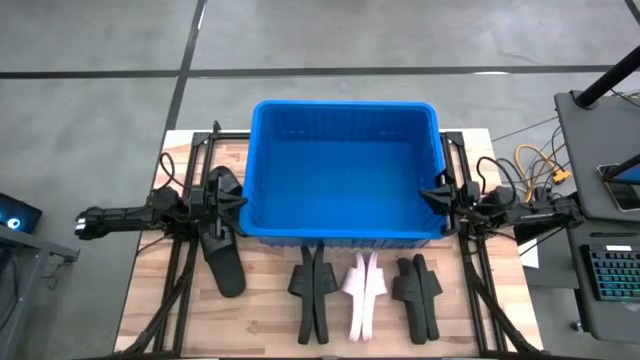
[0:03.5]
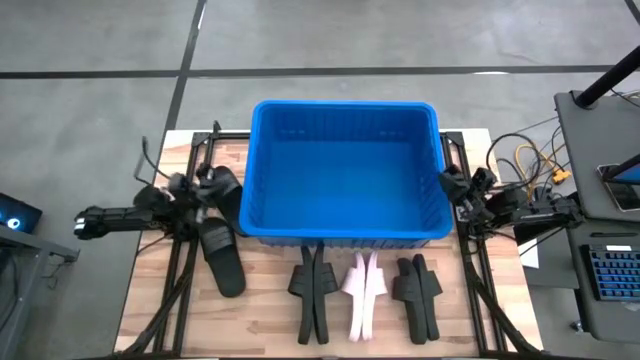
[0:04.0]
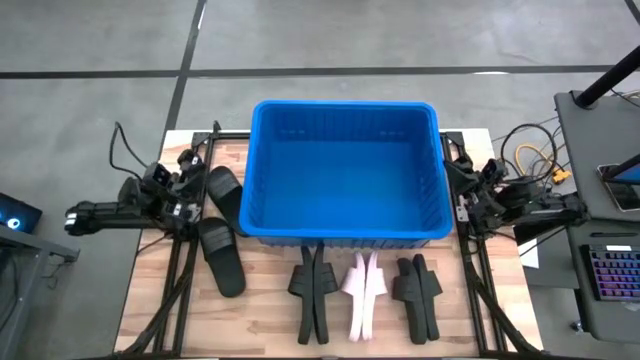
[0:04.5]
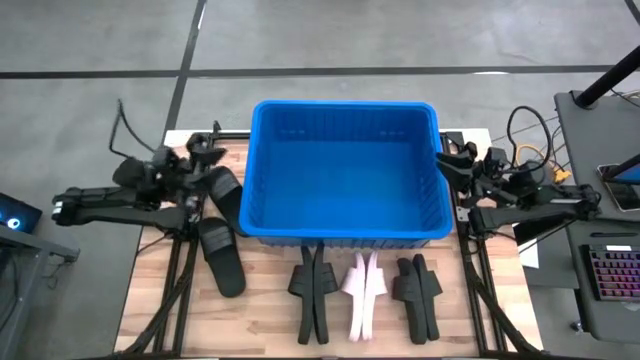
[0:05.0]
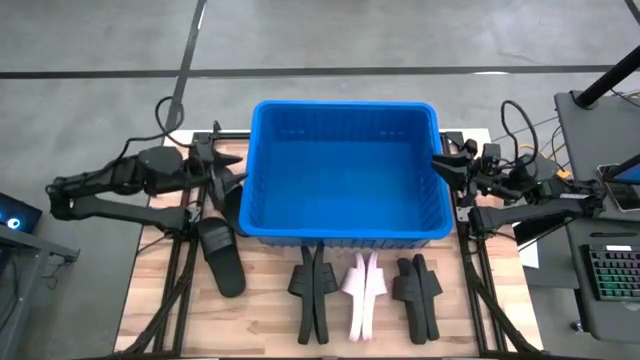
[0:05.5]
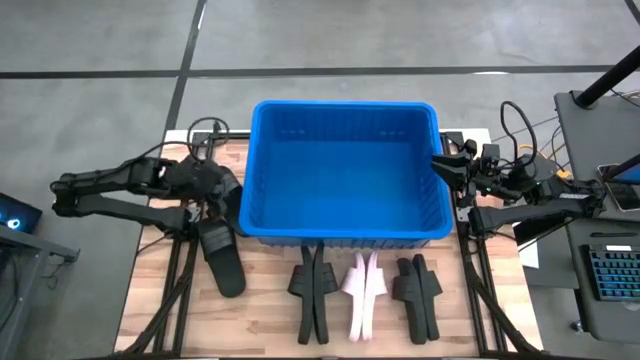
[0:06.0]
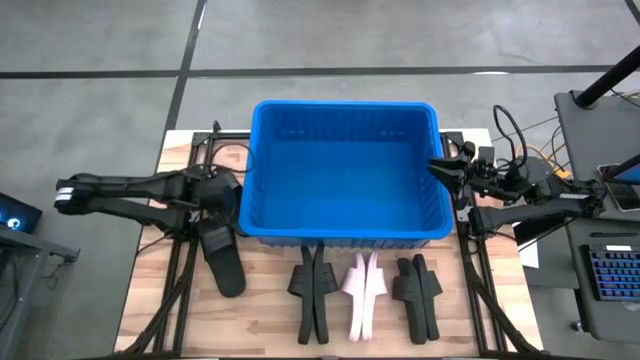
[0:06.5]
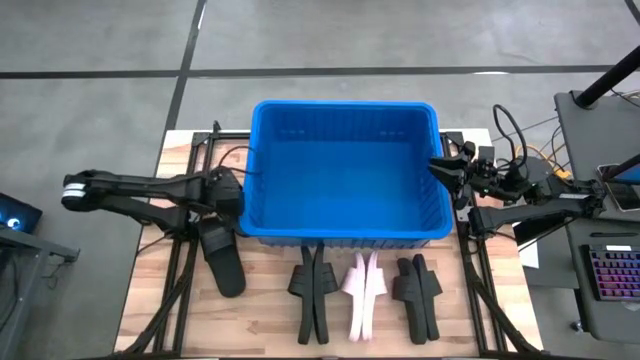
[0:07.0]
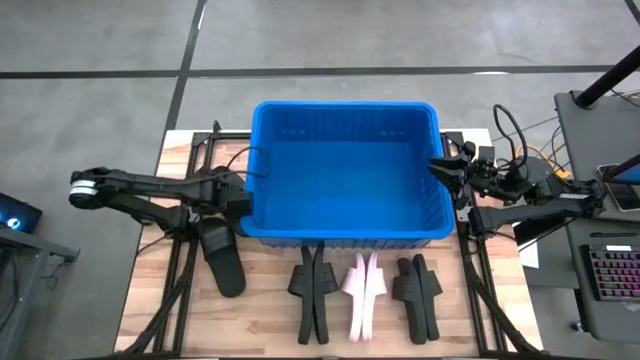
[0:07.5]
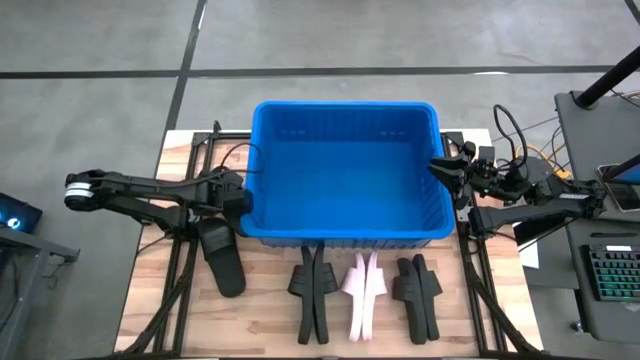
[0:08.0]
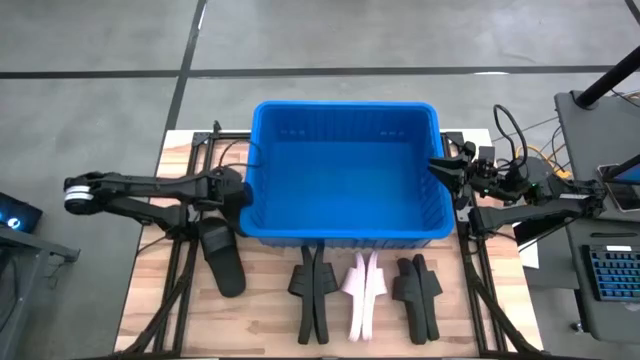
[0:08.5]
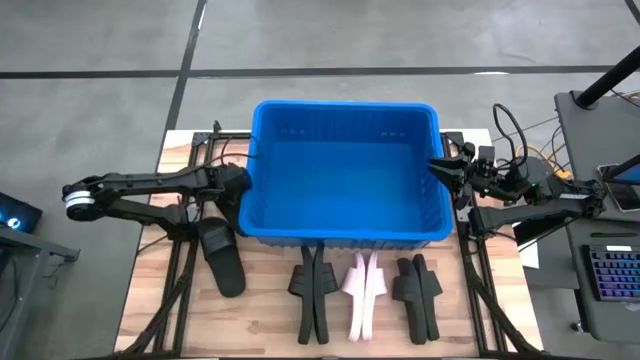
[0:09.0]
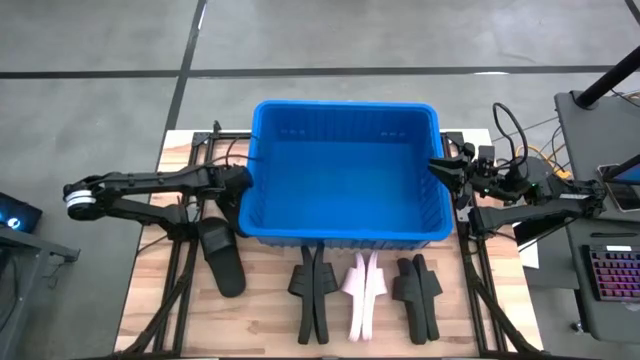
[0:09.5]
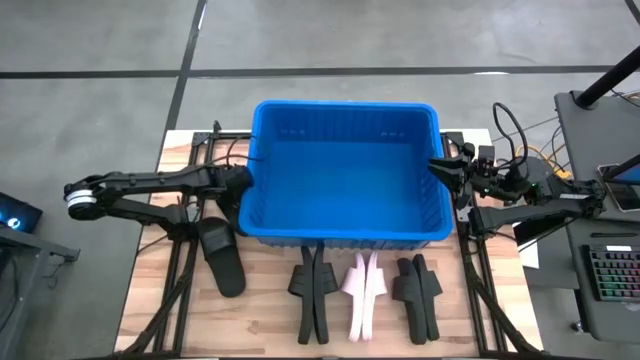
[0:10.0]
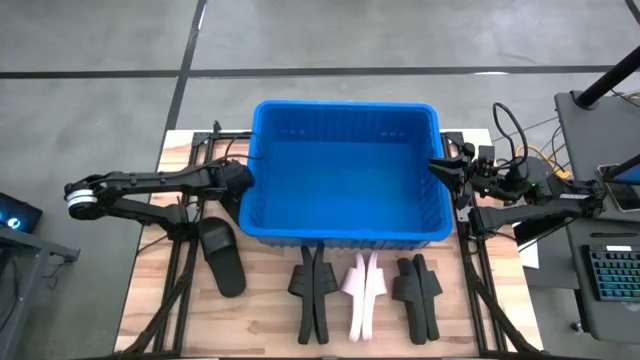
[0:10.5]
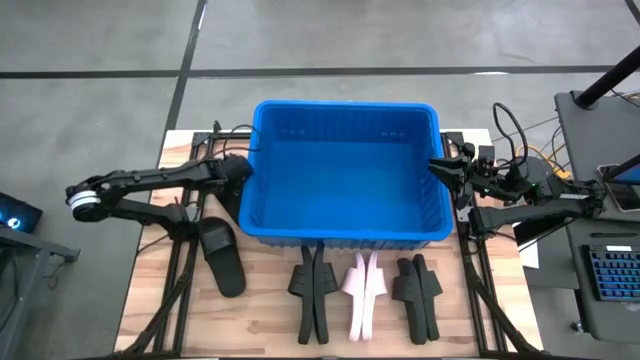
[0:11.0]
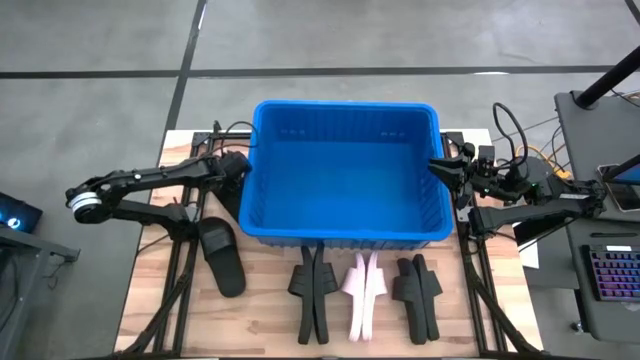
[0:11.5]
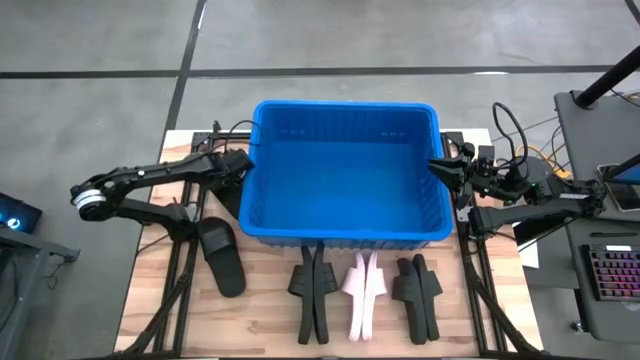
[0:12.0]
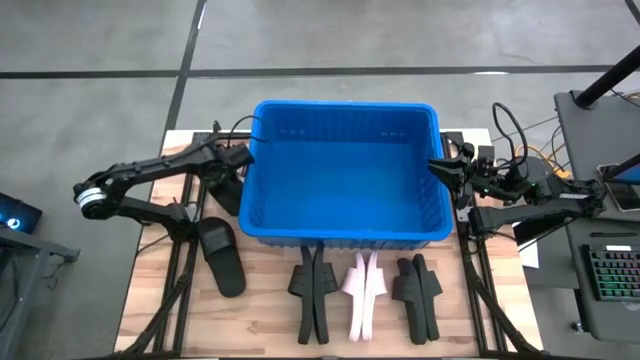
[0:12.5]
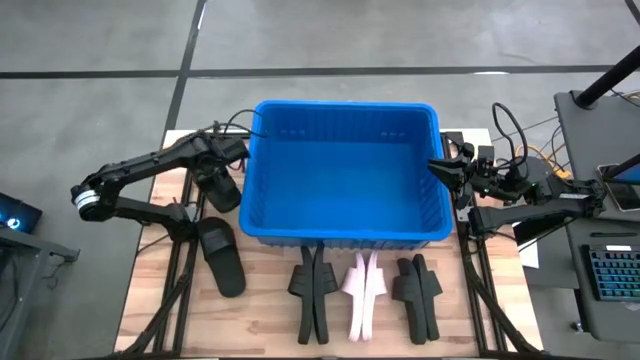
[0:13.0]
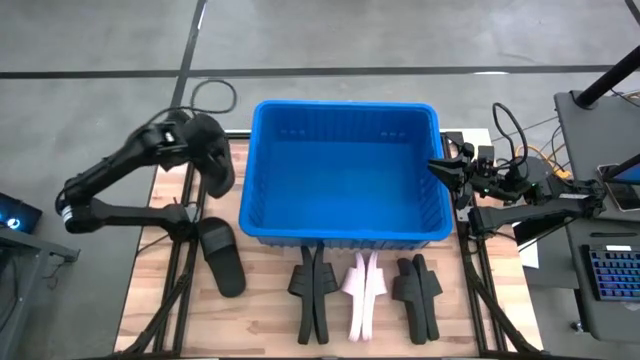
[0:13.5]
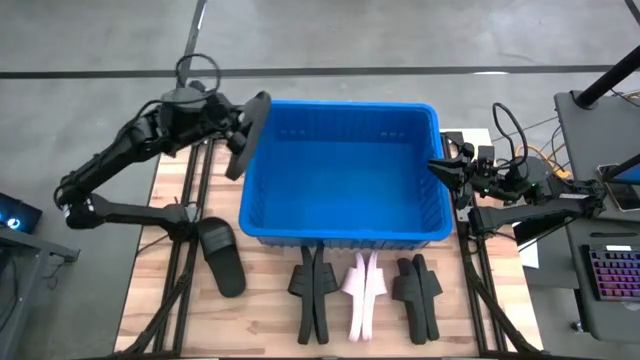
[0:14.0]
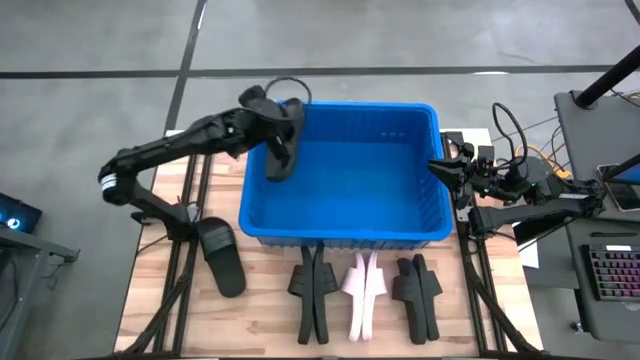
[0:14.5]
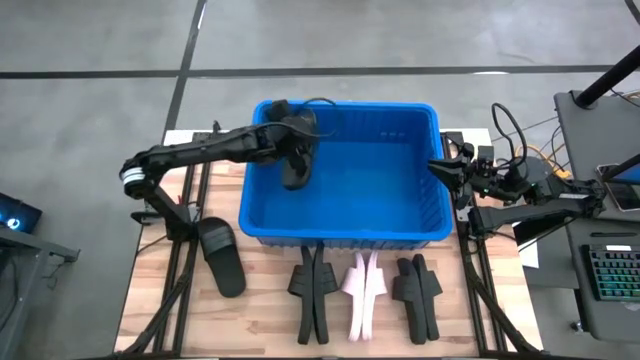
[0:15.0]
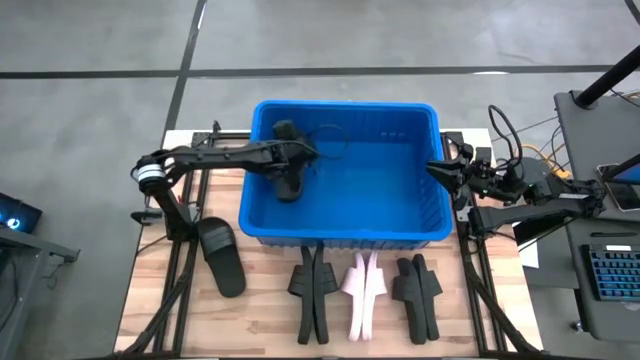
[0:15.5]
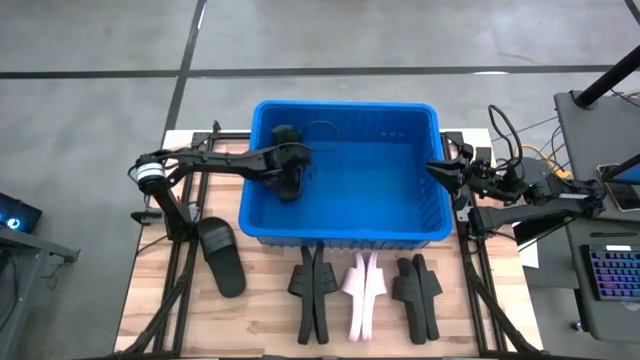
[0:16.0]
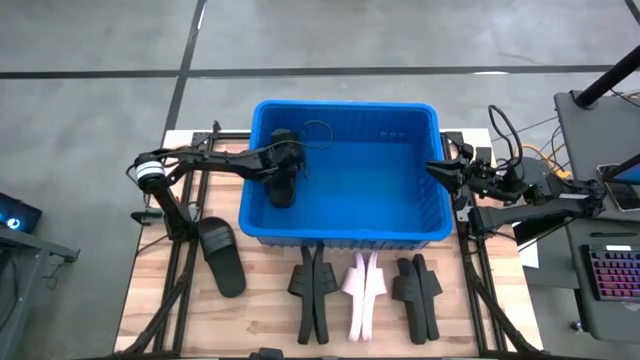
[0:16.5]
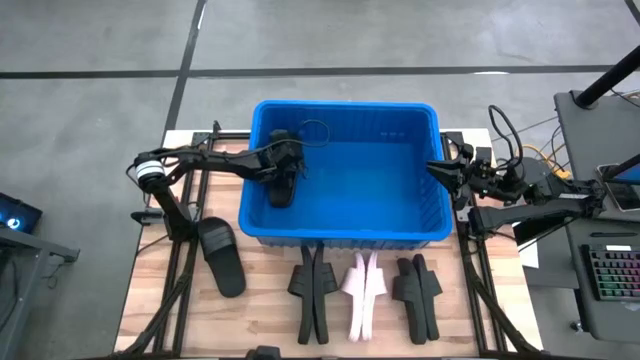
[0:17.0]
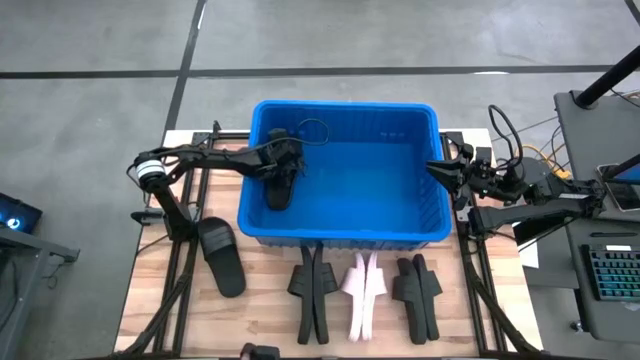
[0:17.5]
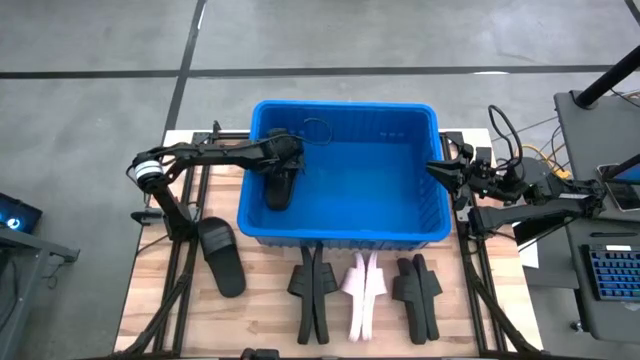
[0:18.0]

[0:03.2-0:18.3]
Task: Pick and place slides into bin
Put the black slides into the blue bin
